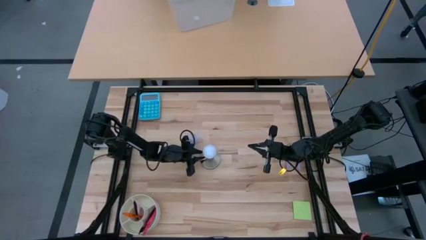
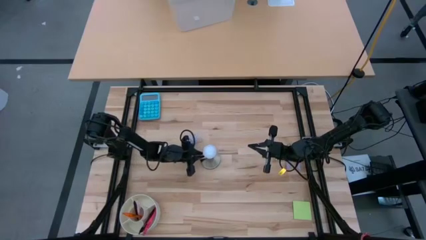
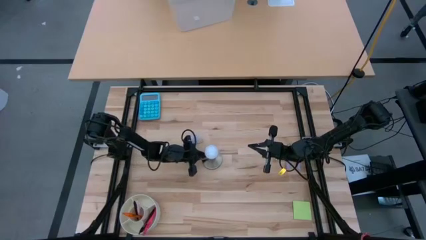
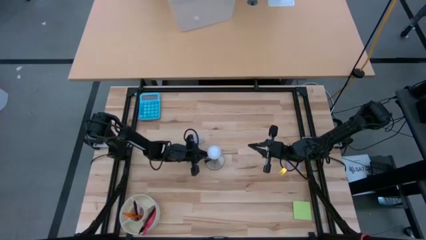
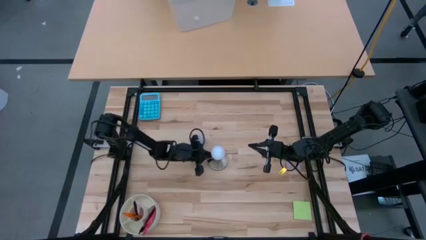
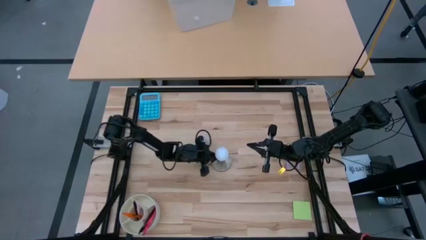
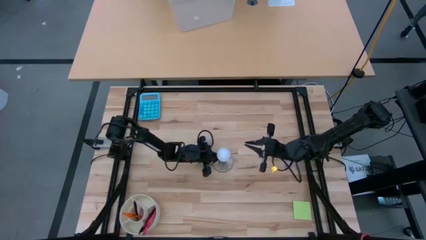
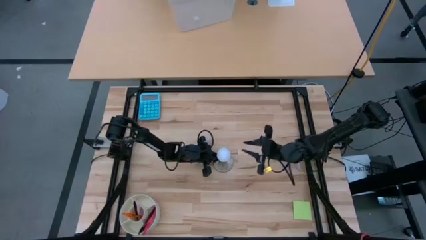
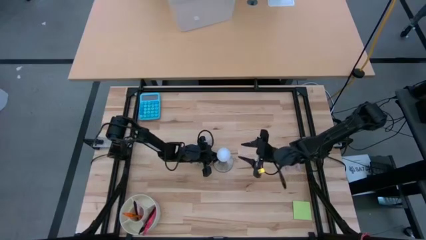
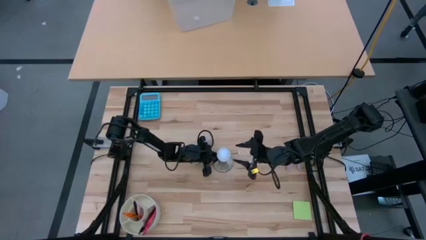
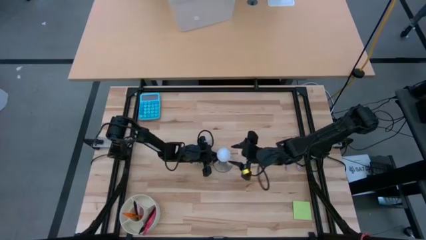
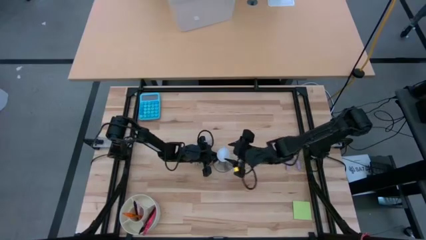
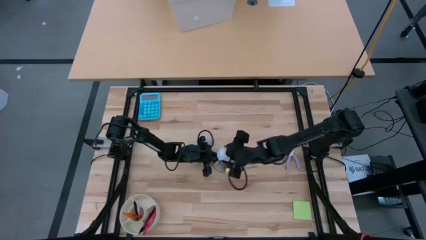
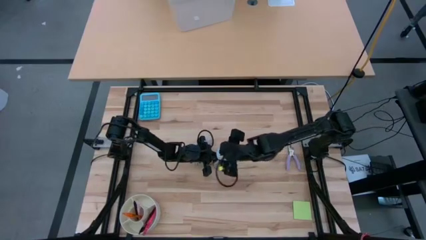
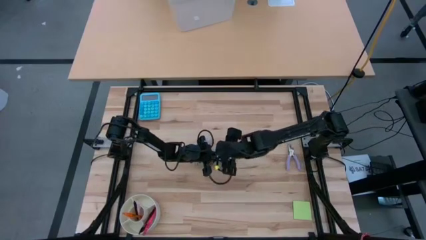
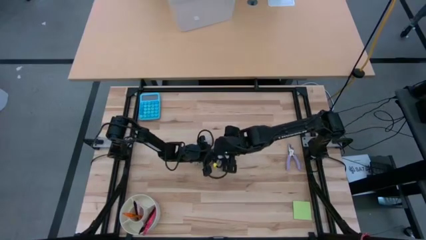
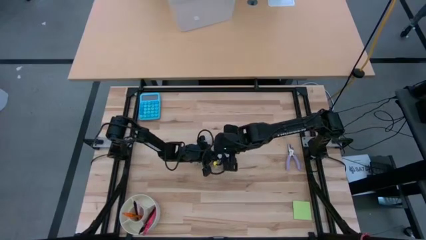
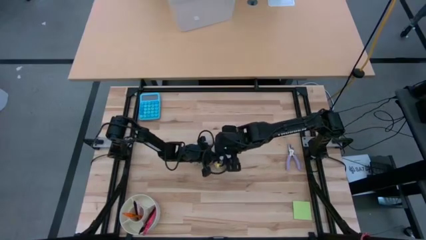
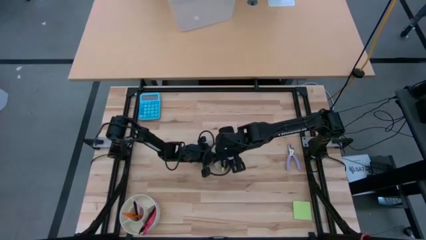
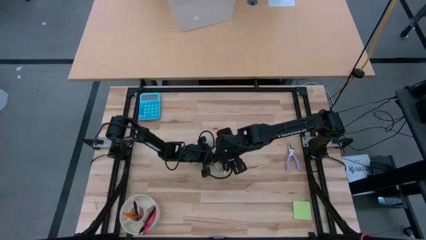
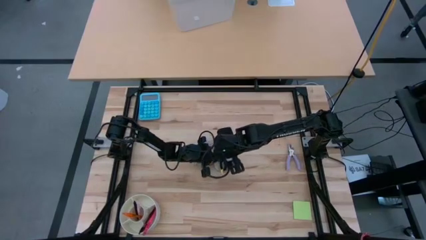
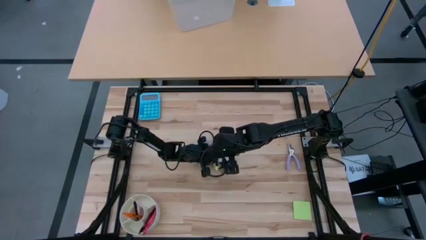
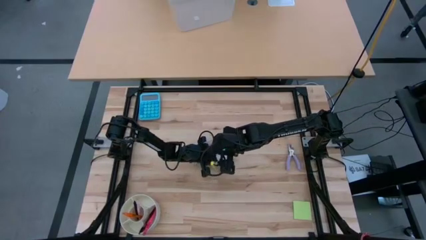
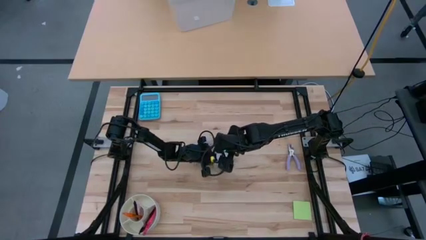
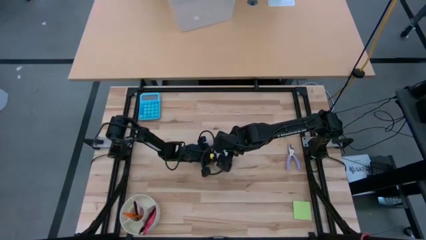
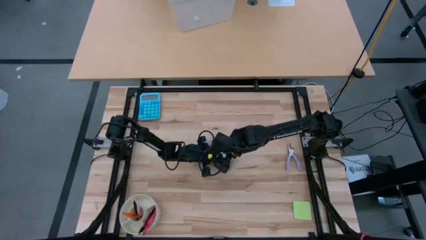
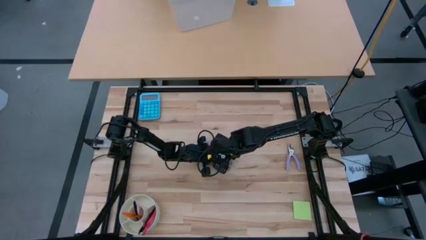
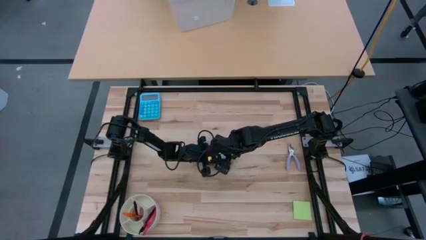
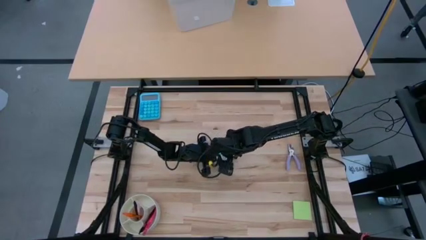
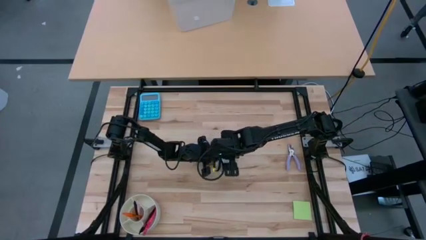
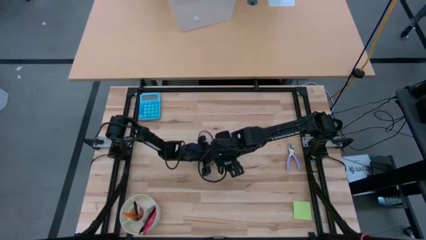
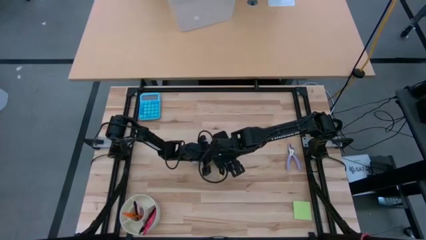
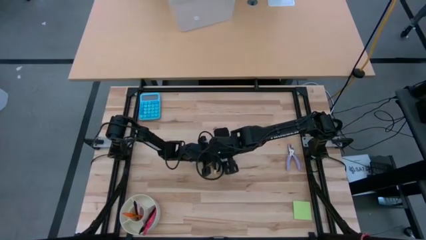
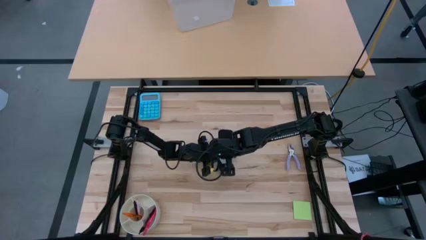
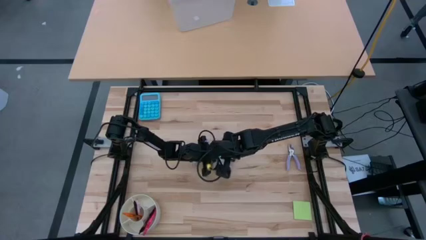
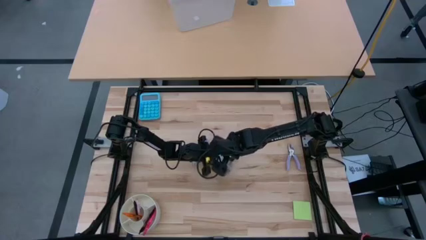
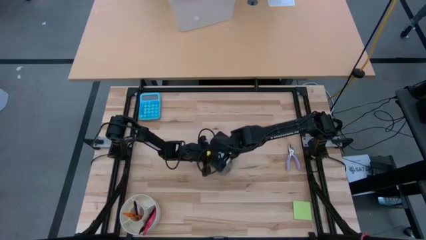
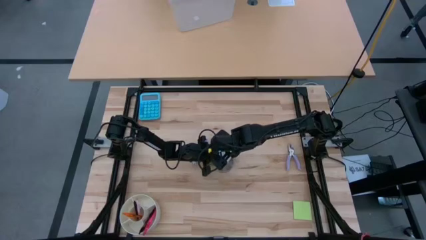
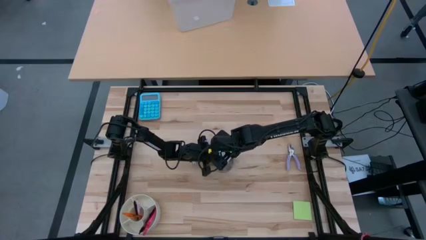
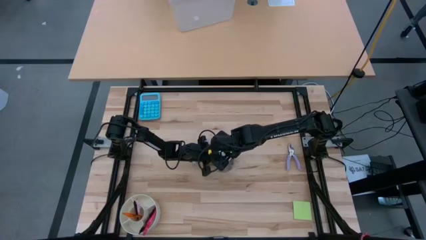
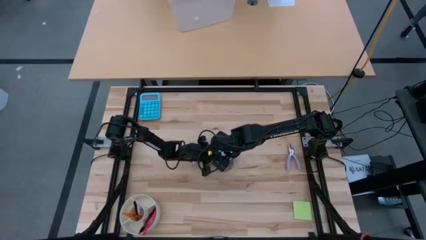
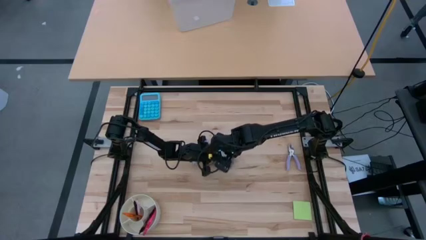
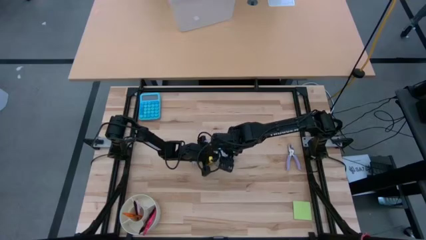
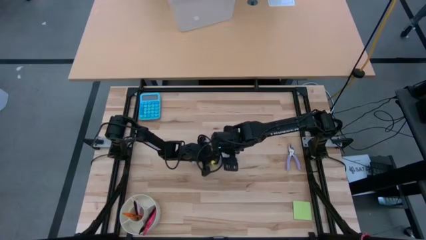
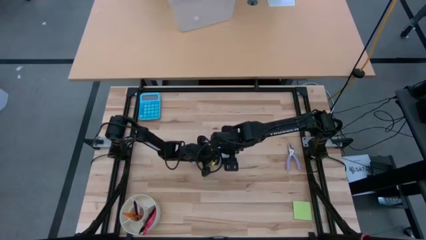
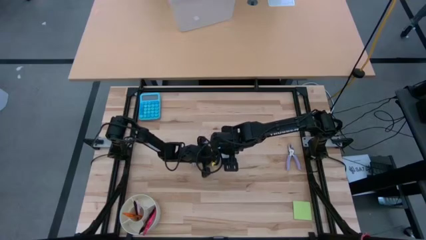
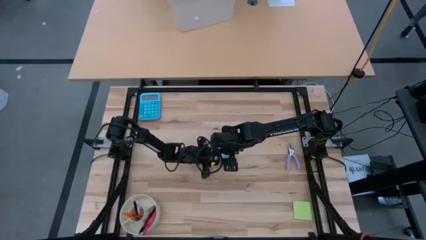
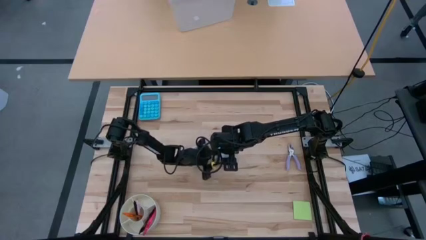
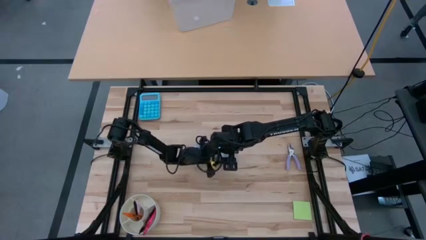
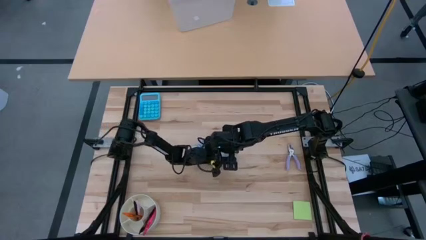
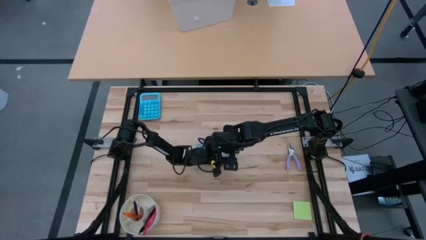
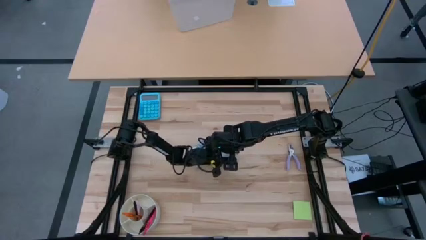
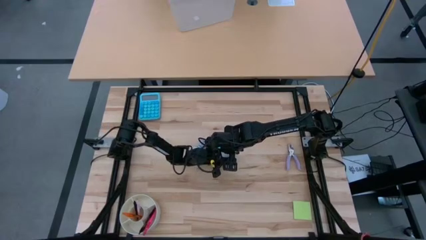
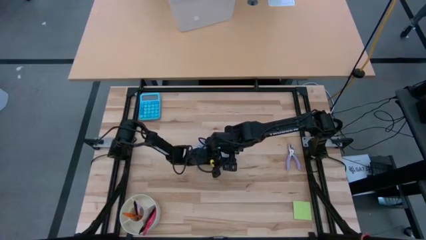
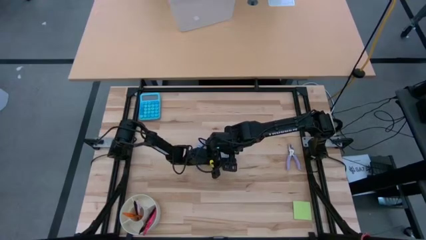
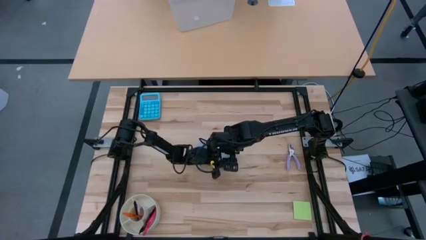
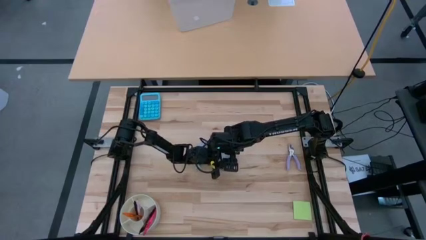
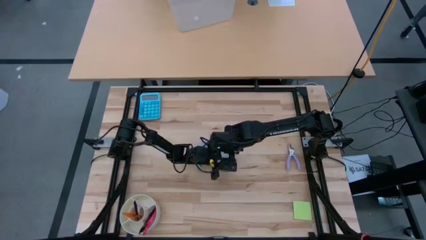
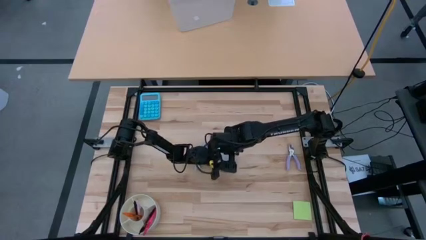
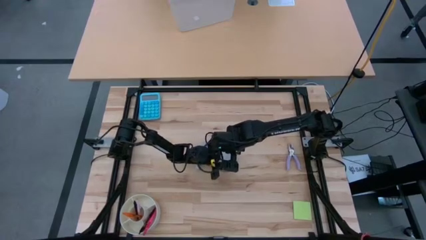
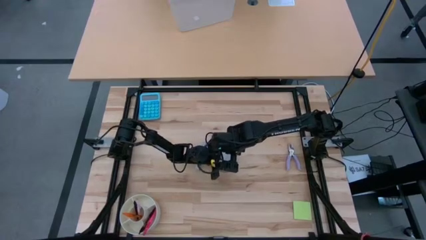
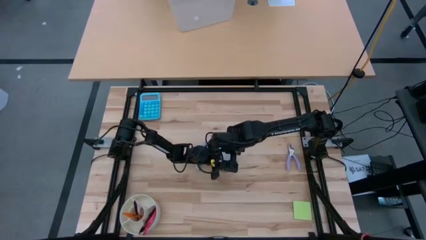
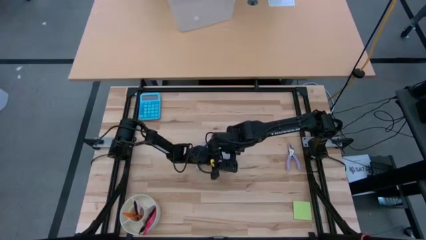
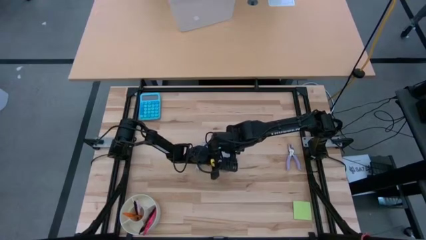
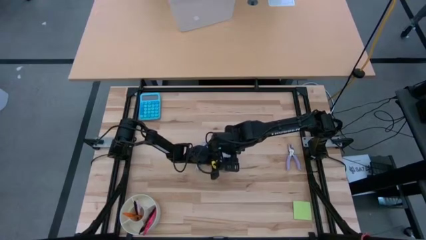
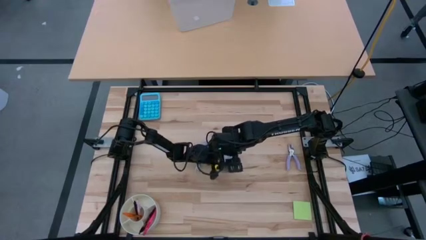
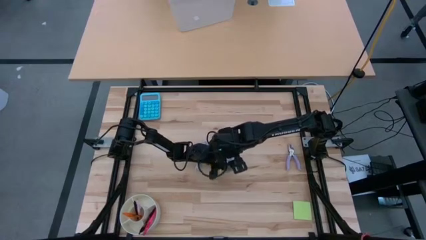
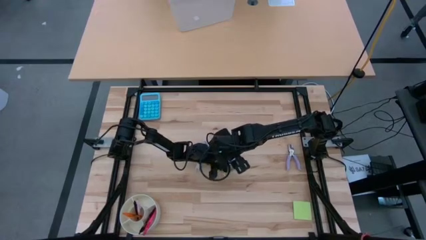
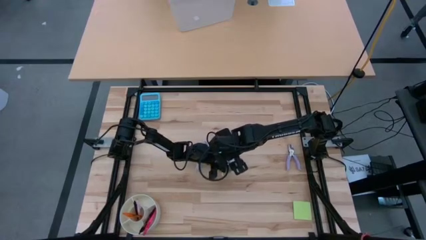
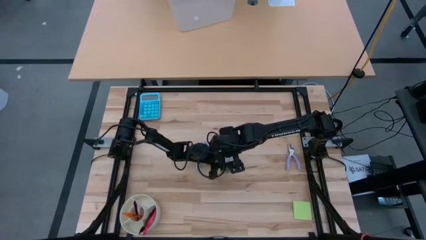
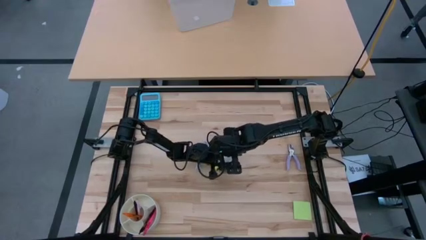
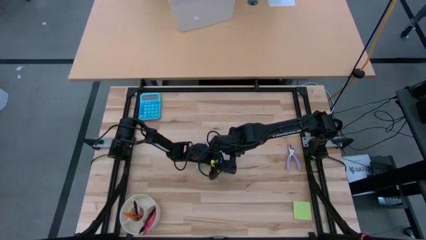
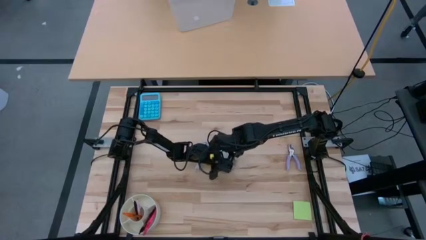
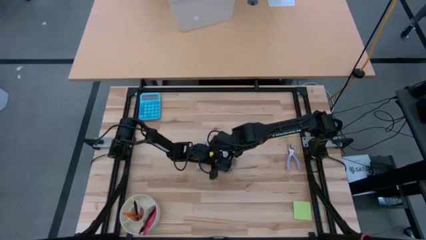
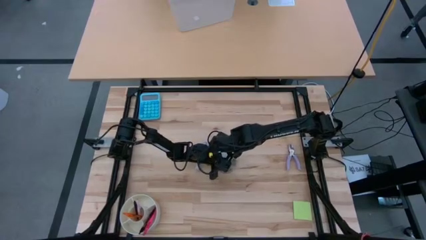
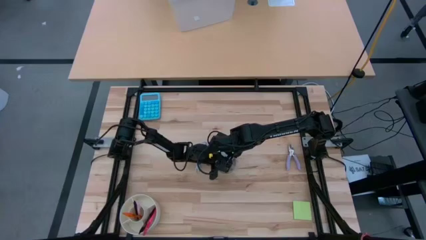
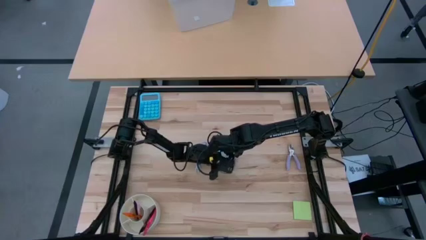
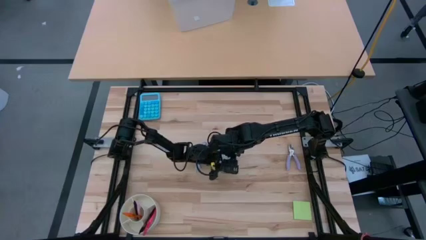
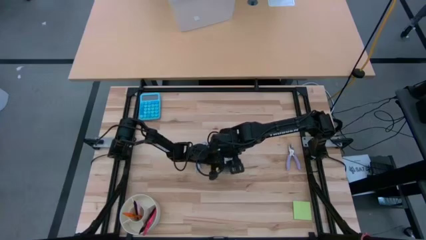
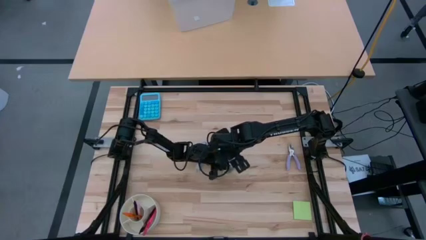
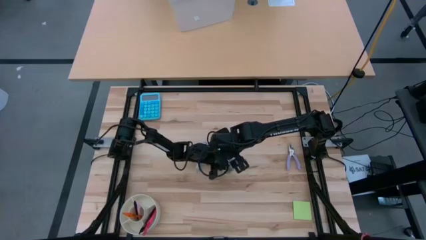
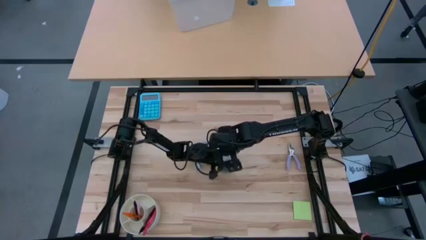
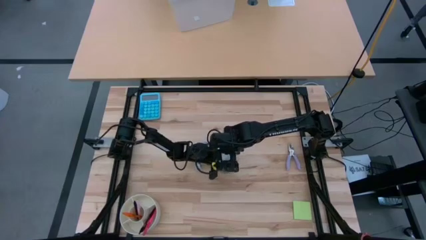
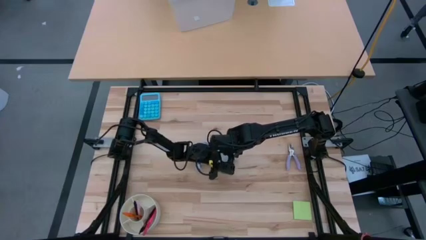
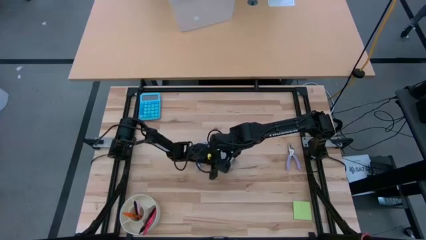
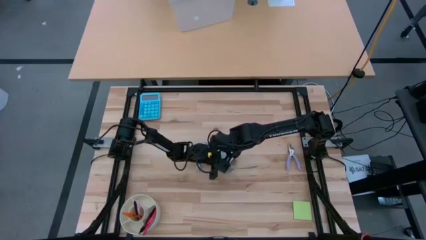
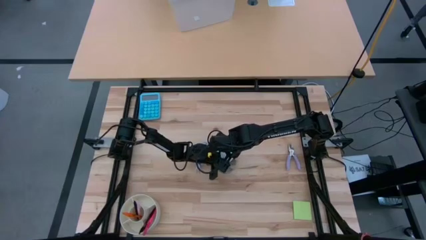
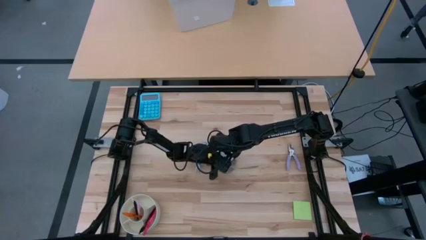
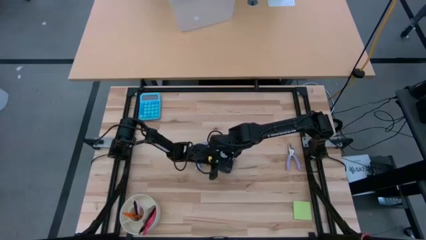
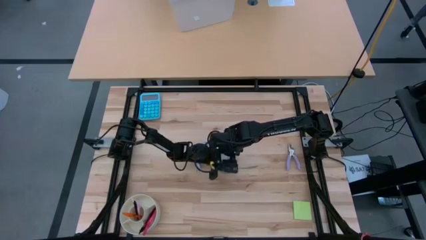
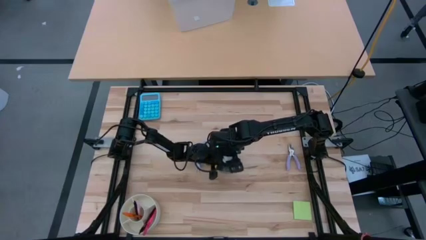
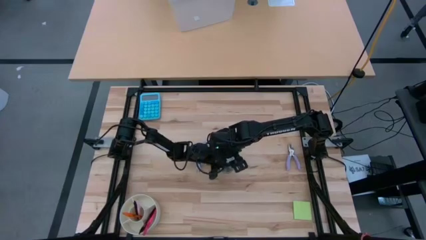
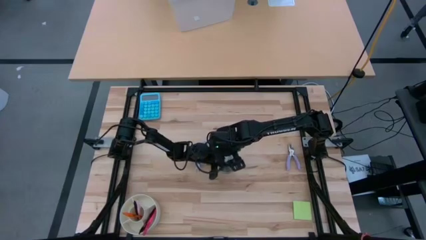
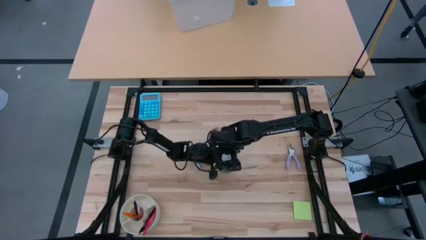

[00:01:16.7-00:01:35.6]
Task: Screw lightbulb
Remove the light bulb from the lamp
